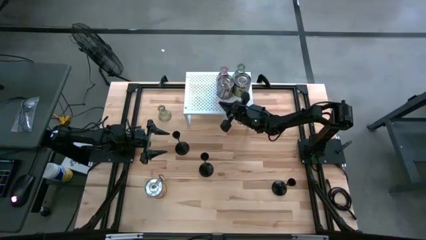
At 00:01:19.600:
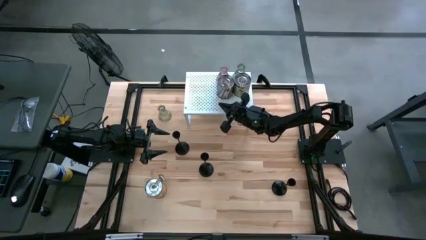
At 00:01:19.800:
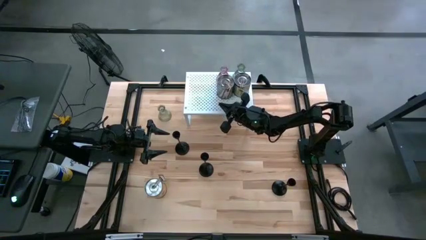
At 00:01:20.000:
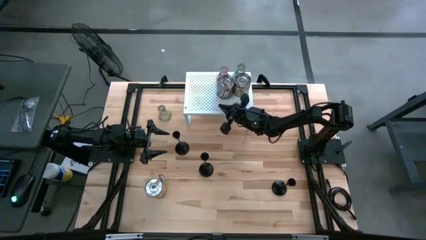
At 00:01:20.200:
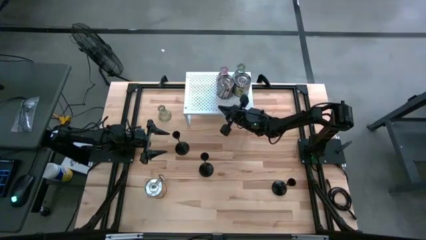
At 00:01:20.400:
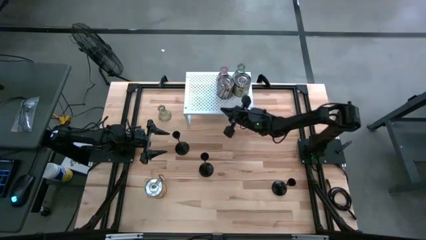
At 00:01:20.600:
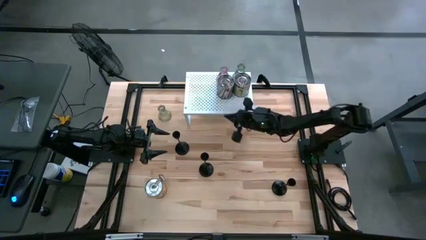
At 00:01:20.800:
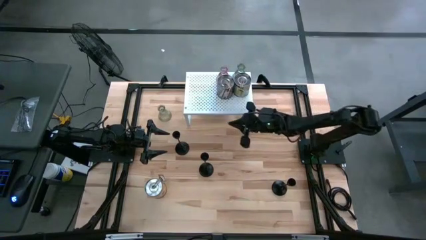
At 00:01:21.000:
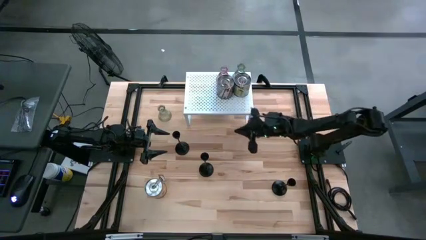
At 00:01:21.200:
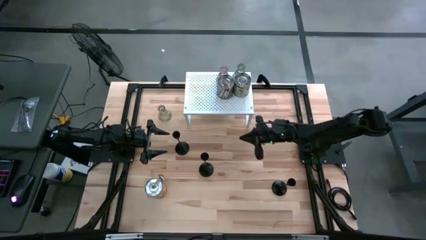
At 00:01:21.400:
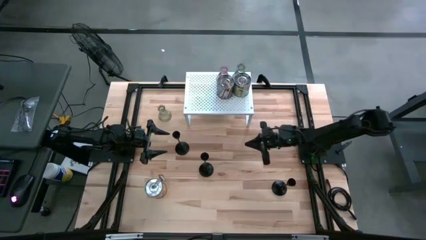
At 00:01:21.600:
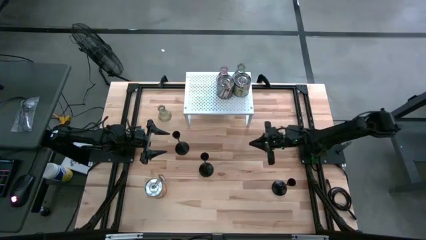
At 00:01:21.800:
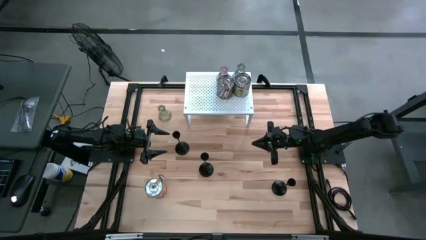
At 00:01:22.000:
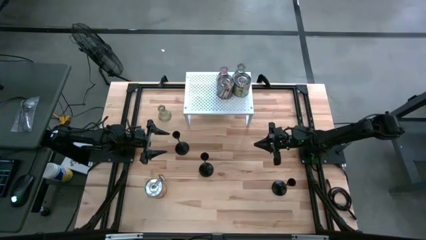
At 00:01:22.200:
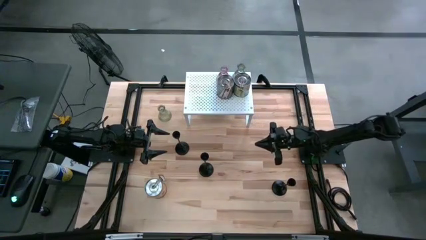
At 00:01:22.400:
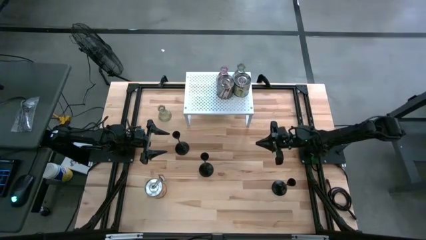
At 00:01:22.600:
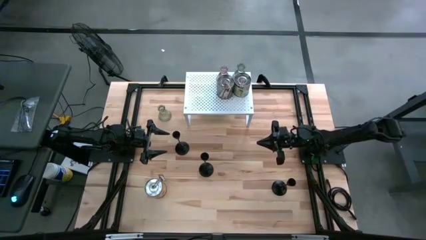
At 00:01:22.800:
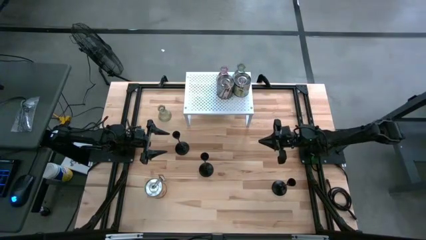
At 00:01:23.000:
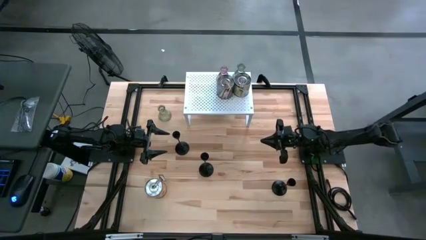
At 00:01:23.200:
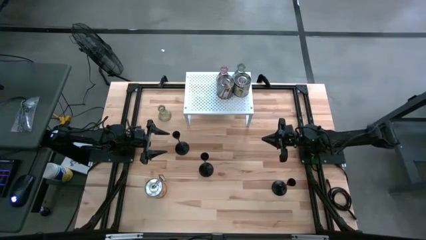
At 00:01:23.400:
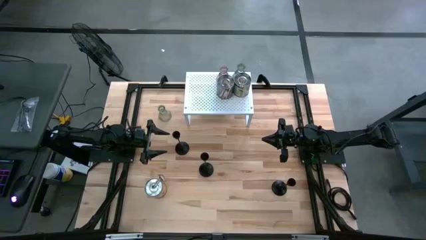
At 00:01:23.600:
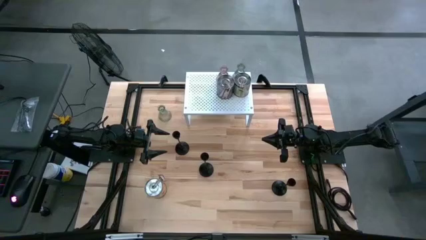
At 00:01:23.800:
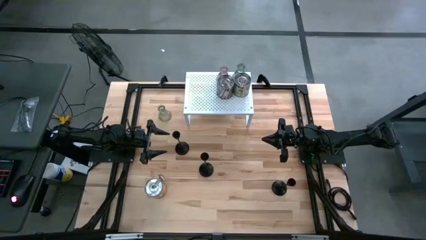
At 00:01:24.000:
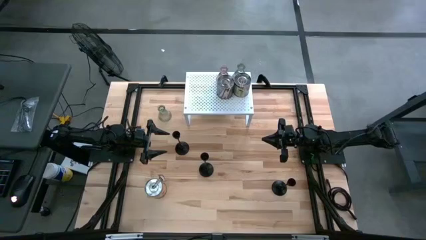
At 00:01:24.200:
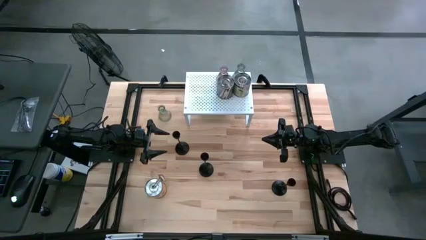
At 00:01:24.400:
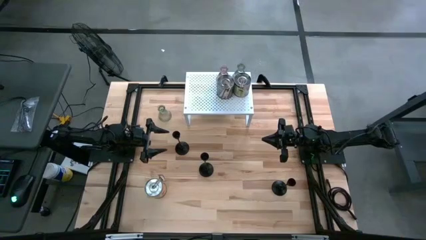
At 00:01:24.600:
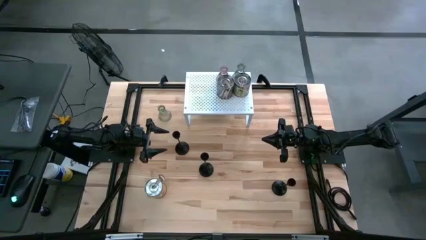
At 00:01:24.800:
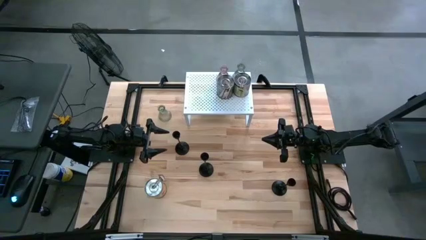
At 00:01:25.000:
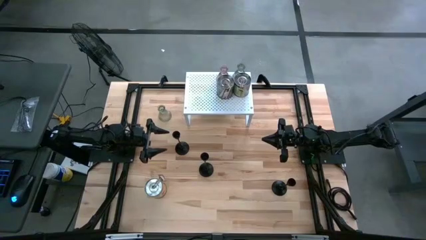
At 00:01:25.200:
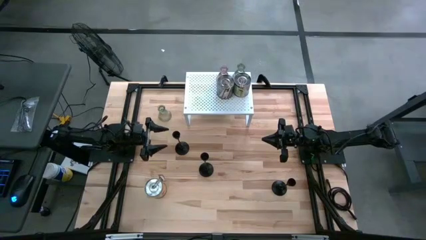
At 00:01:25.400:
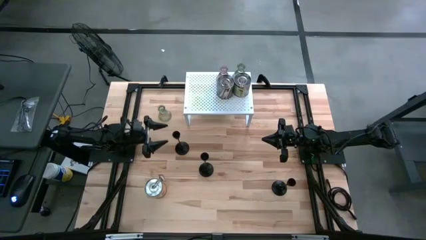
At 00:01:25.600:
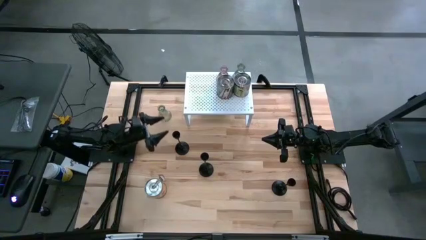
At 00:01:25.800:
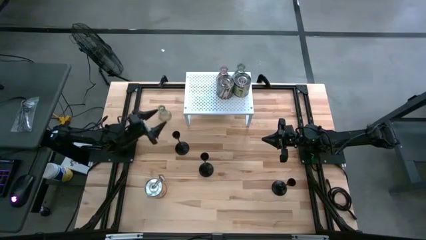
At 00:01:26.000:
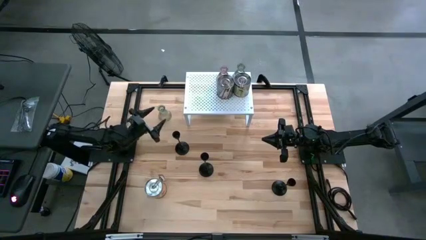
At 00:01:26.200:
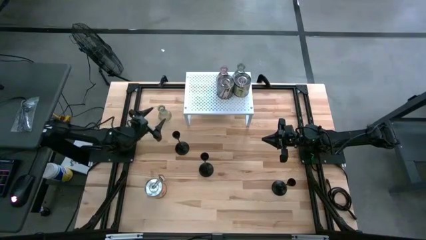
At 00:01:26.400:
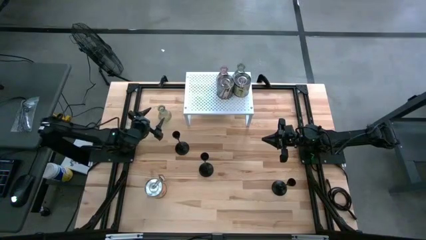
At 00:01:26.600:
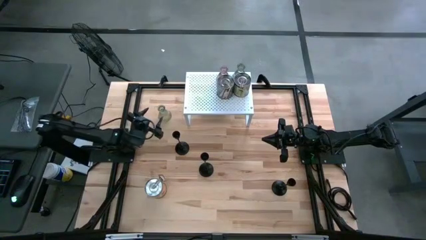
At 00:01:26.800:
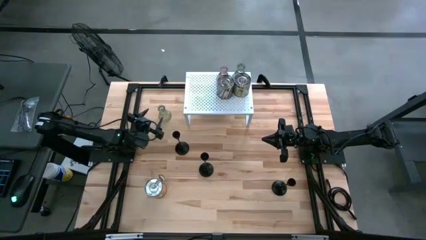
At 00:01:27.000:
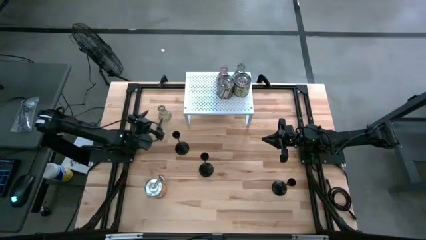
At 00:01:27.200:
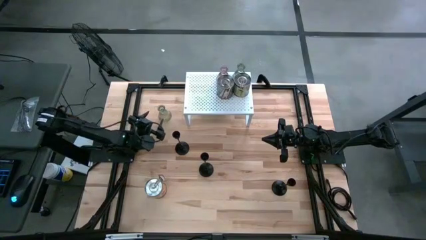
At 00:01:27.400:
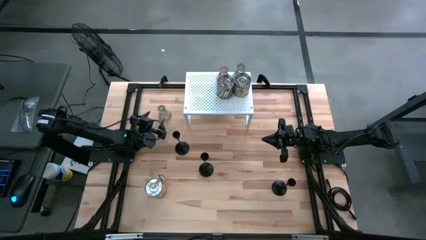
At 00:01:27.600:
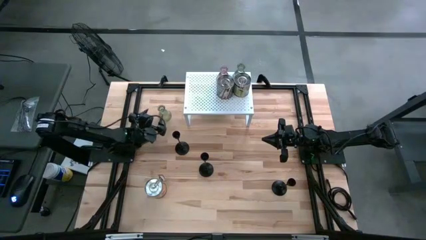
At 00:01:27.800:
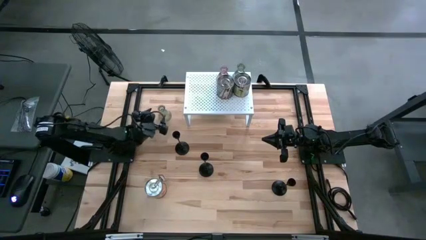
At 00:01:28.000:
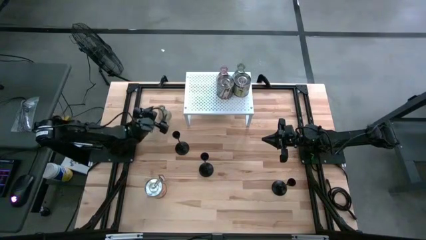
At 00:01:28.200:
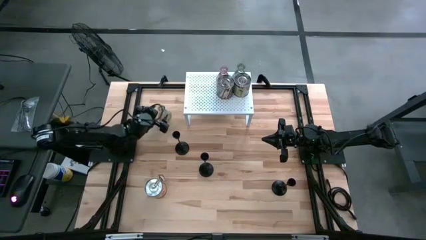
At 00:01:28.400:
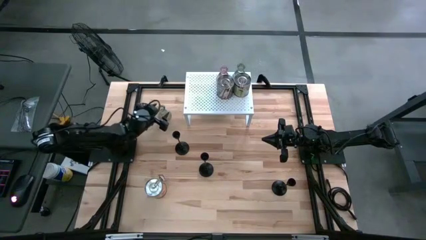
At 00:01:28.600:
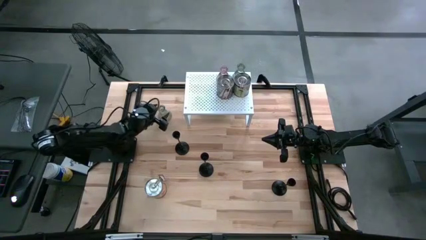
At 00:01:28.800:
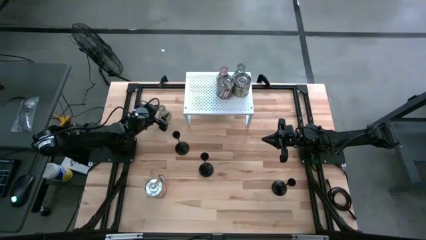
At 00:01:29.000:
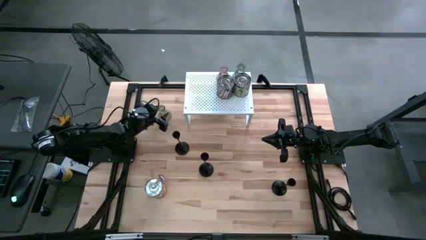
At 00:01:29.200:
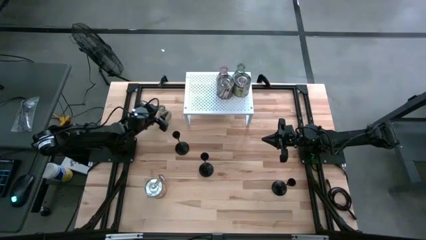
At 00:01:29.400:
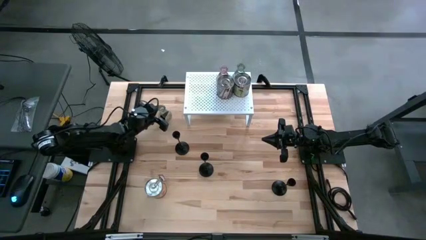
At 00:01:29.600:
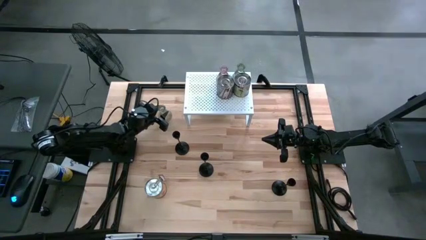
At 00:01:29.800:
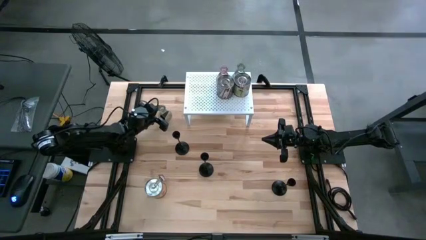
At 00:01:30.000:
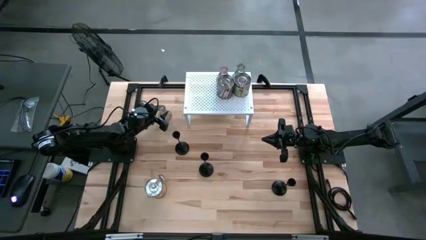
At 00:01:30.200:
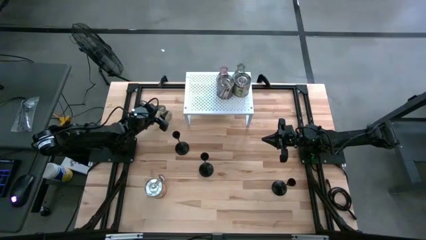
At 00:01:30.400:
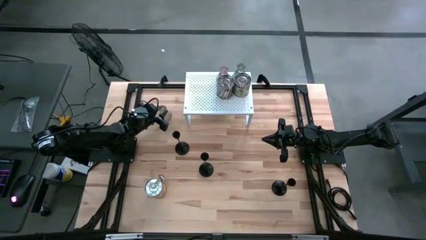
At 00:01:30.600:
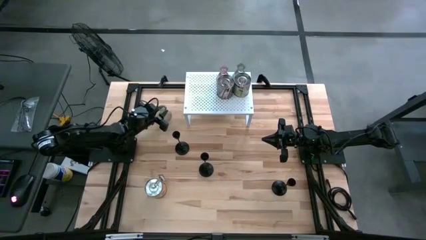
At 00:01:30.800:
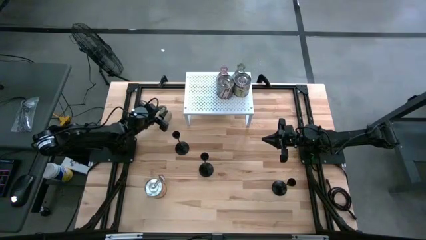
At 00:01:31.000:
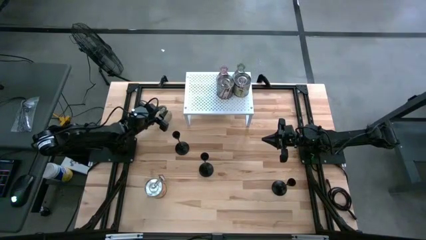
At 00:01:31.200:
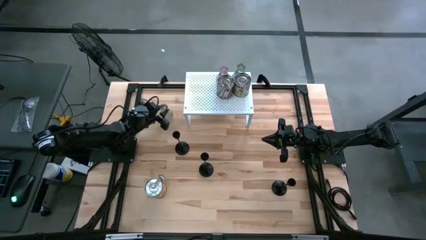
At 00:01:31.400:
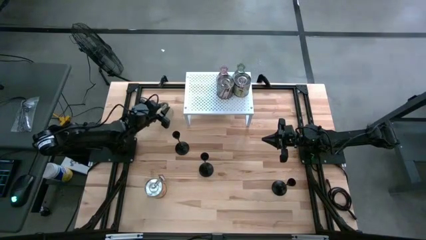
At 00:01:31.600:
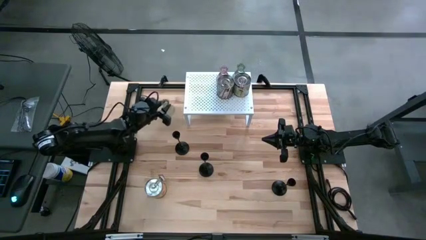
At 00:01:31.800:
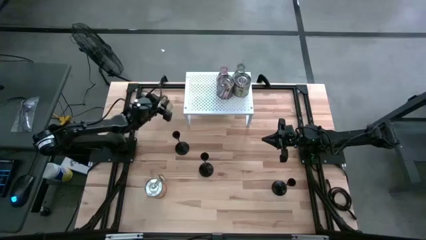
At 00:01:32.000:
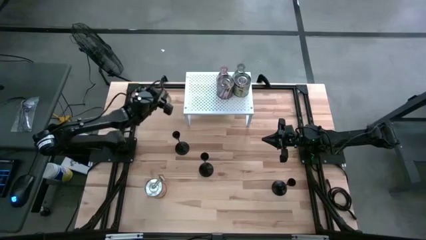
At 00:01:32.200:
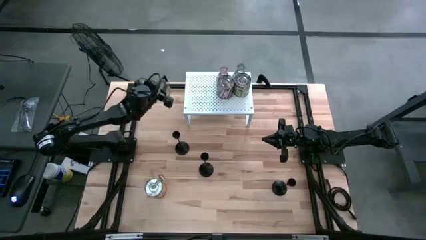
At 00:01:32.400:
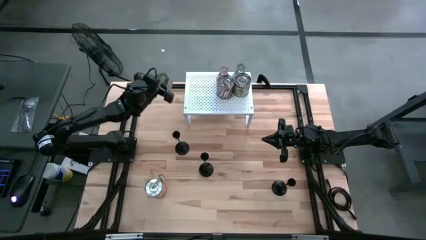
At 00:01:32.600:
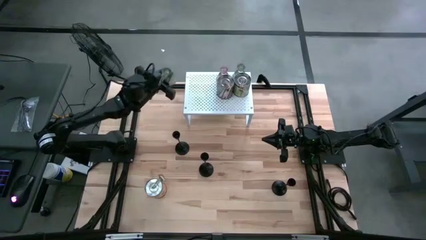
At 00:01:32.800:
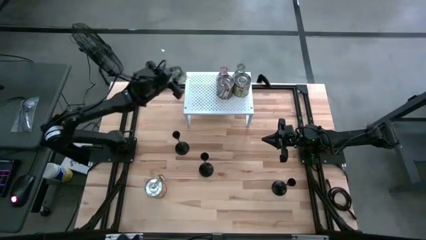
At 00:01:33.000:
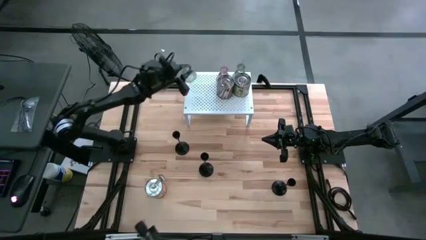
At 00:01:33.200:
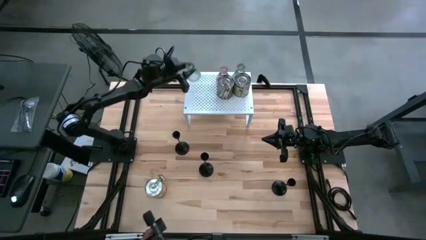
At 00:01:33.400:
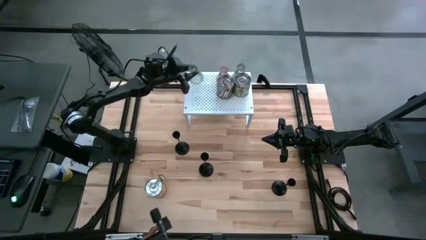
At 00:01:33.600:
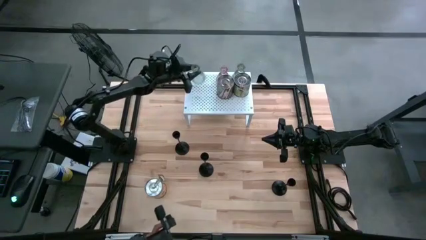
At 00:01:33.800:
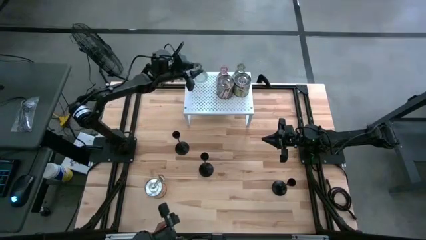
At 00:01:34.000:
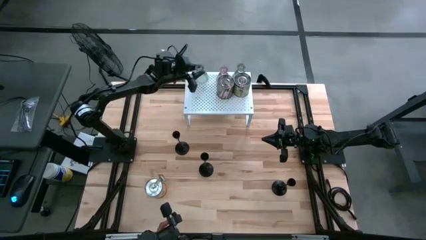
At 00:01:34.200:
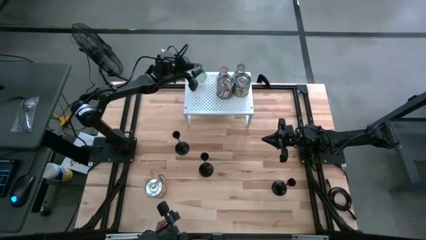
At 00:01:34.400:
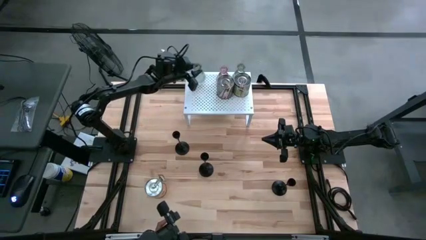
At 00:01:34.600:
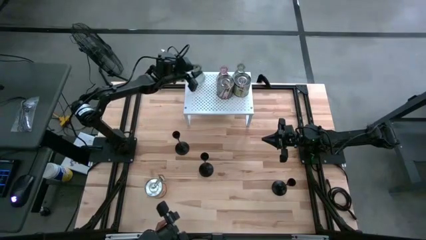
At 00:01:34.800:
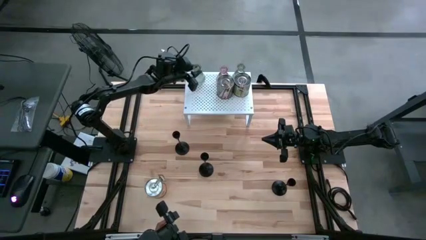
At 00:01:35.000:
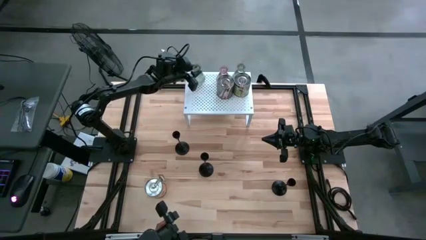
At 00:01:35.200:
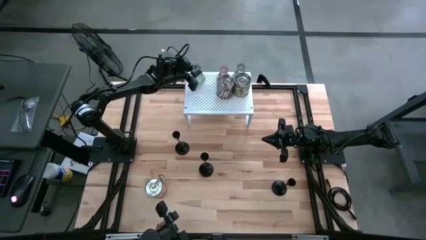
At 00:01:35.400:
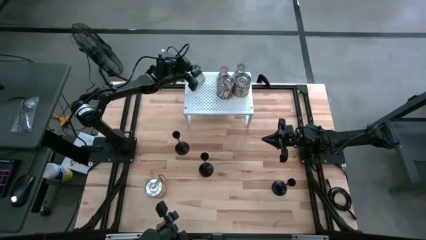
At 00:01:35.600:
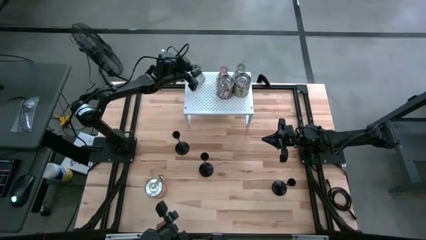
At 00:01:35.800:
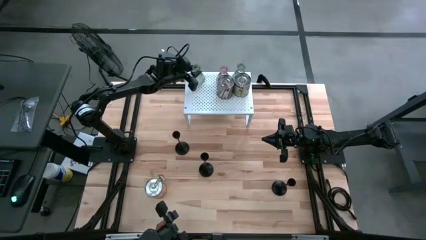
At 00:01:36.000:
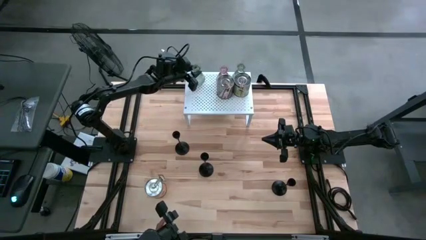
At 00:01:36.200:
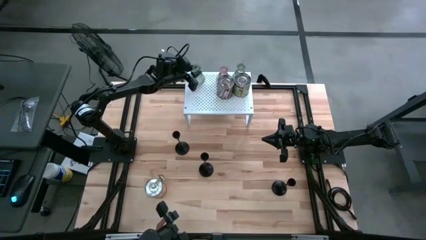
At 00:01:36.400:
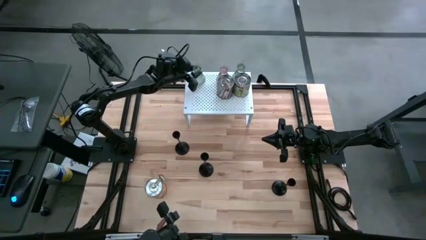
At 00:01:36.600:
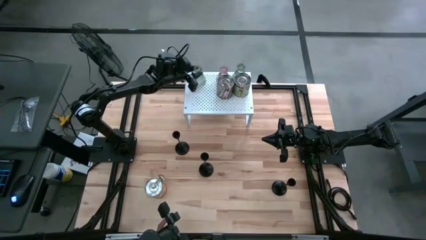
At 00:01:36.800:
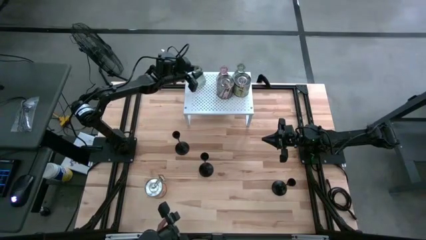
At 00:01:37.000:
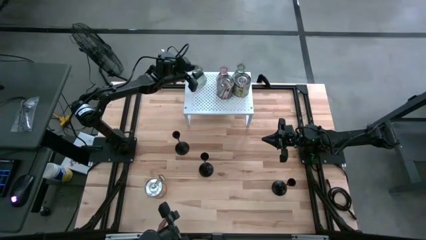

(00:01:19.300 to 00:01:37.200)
Task: Pick & Place candle stick holders
Put the green glass candle holder on the shelf aligned with the other glass candle holders
